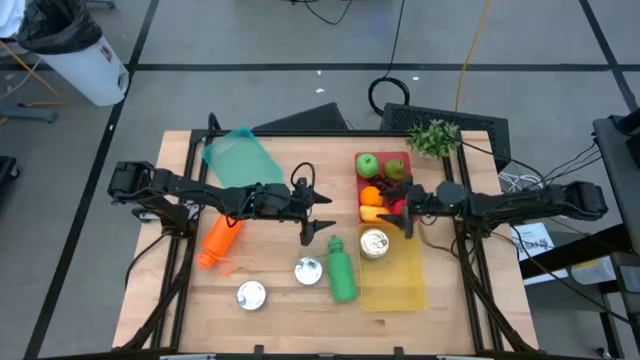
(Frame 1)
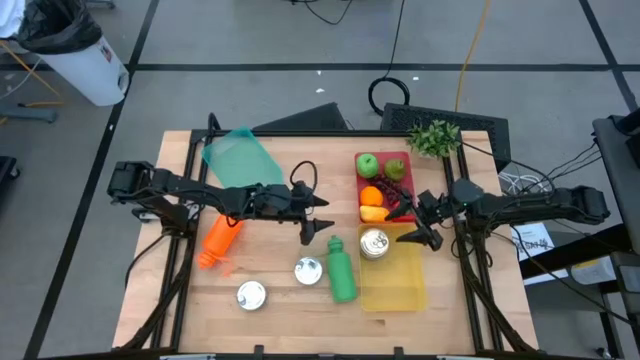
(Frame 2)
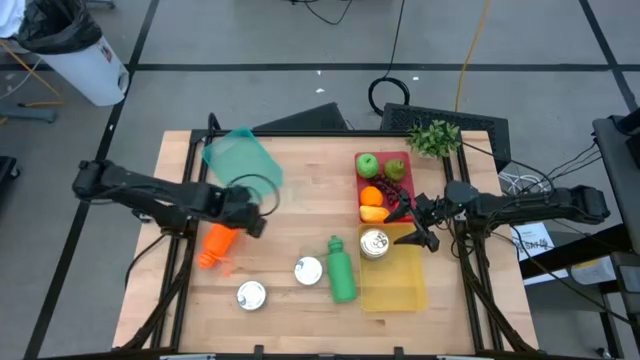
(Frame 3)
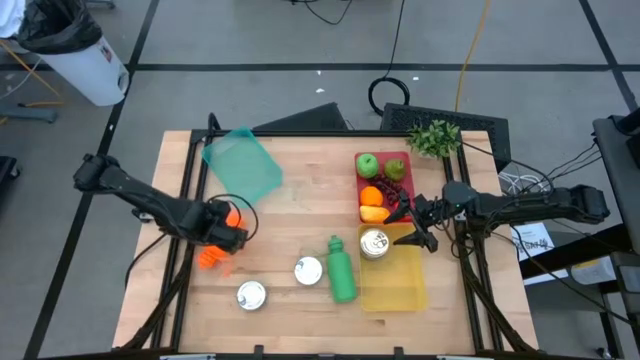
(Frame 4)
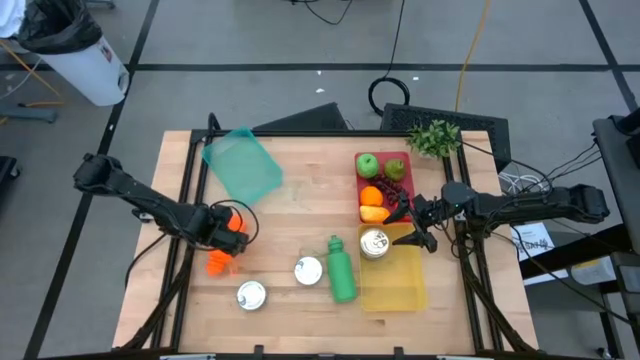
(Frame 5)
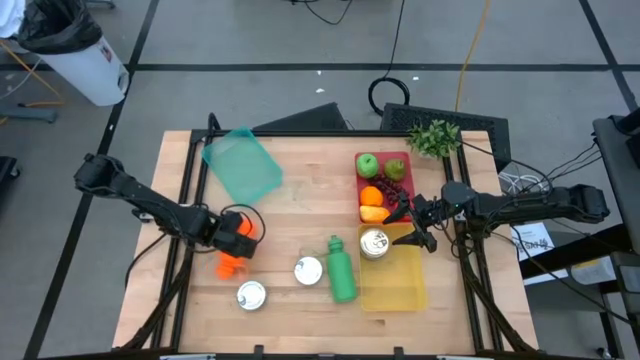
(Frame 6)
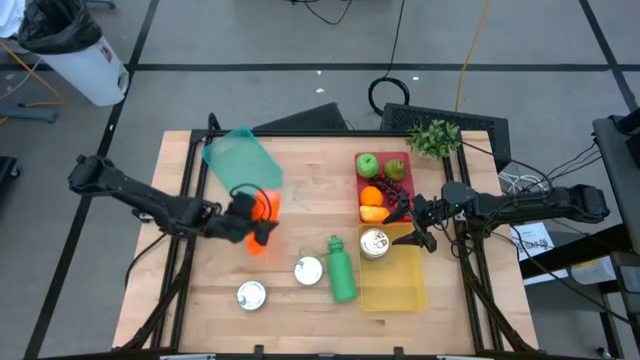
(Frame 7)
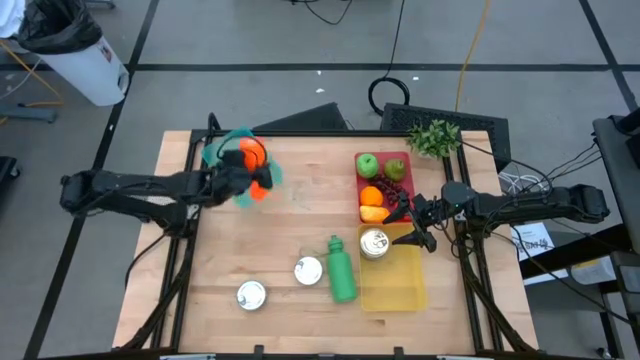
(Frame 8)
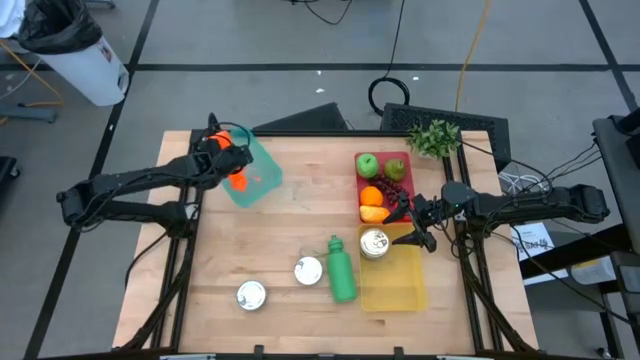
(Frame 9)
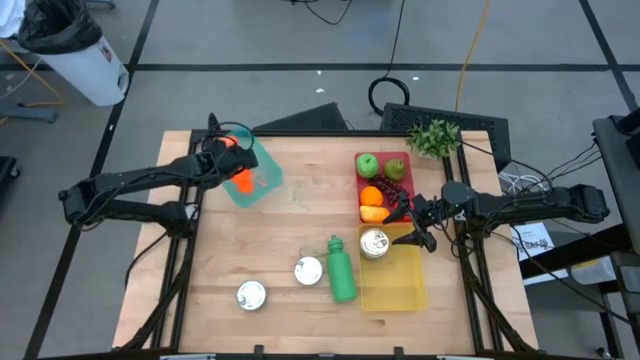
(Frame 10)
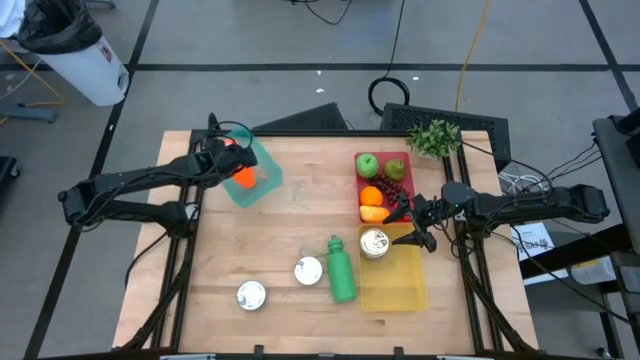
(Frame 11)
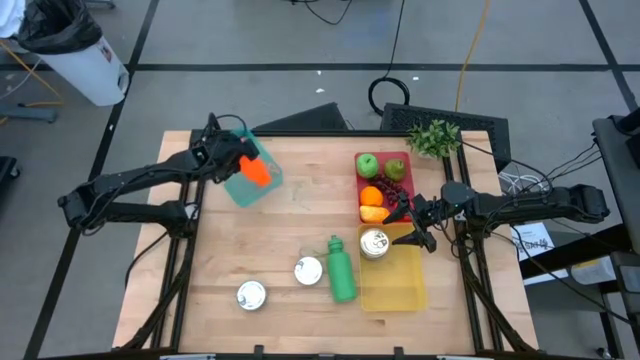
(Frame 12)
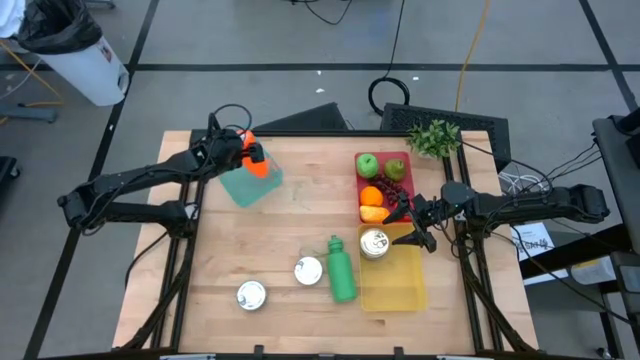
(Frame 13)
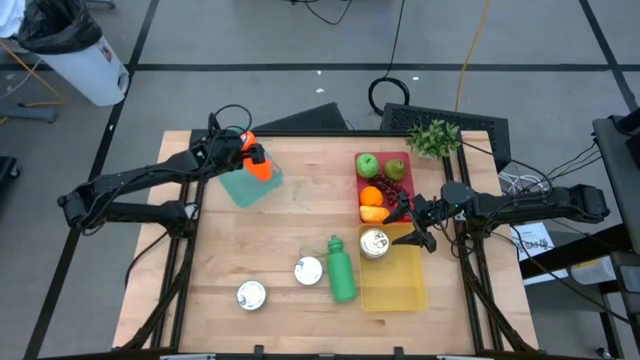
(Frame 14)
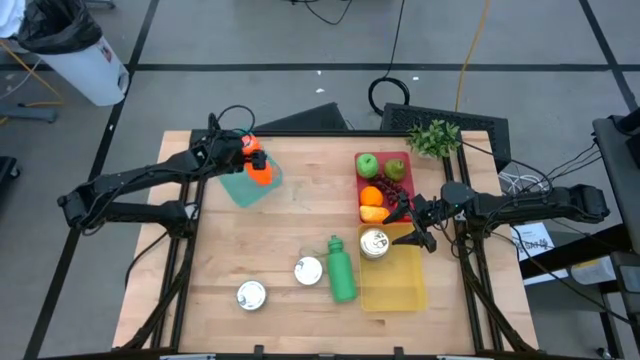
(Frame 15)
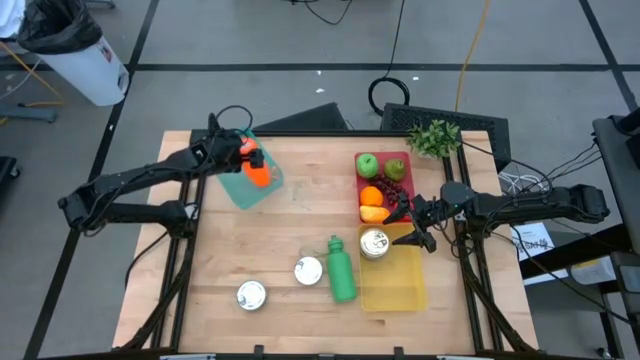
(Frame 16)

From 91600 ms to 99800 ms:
Task: Pick & Place Food Item
Put the orange tumbler into the blue bin

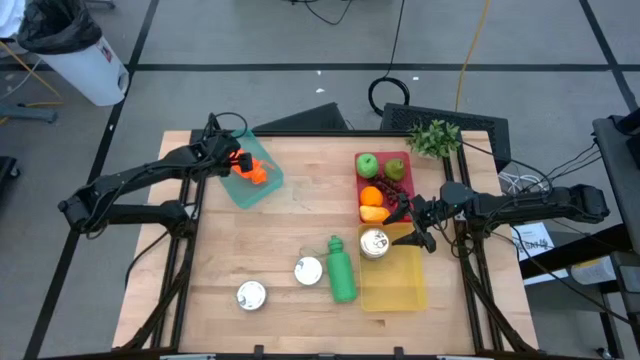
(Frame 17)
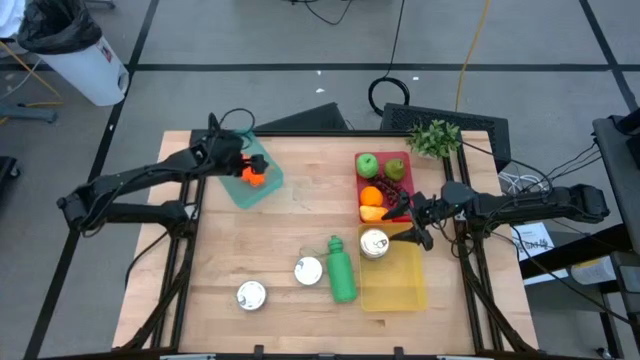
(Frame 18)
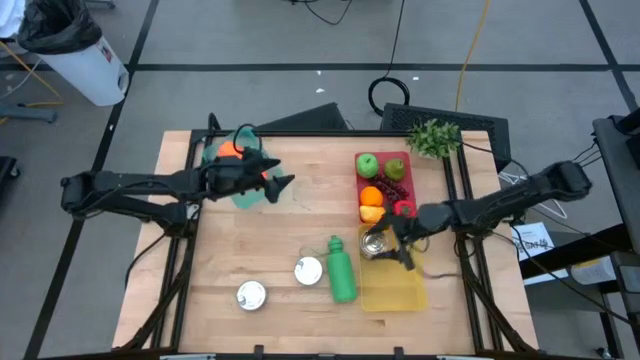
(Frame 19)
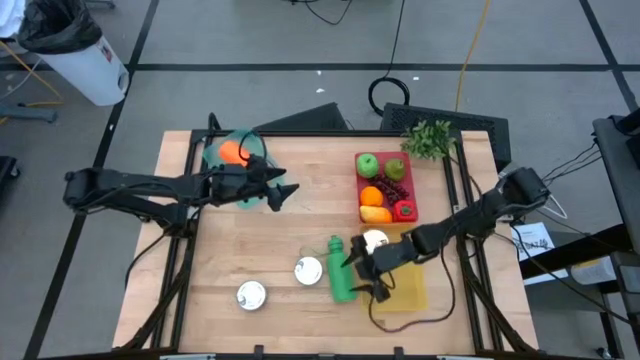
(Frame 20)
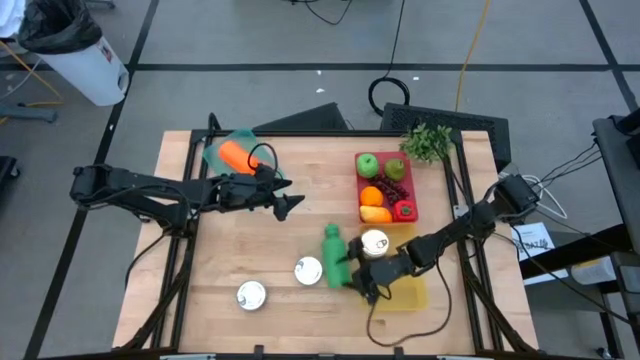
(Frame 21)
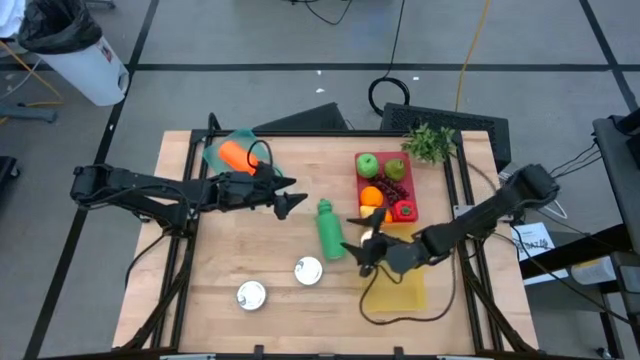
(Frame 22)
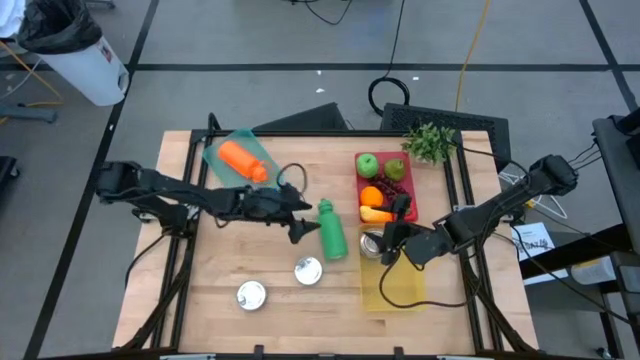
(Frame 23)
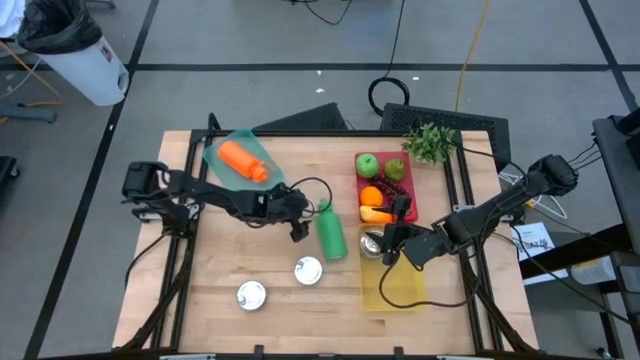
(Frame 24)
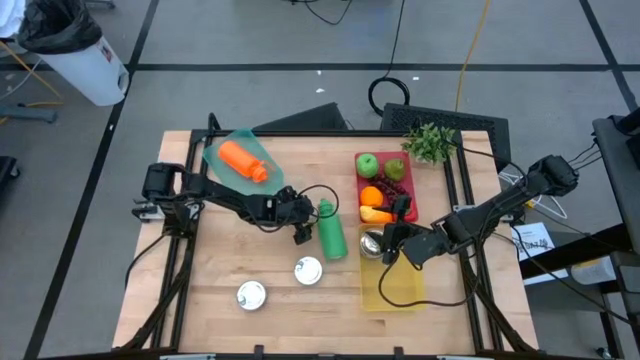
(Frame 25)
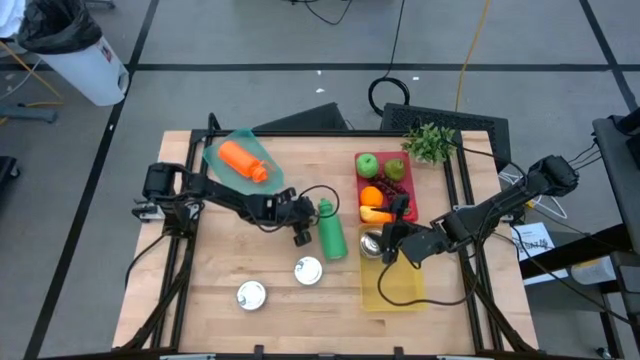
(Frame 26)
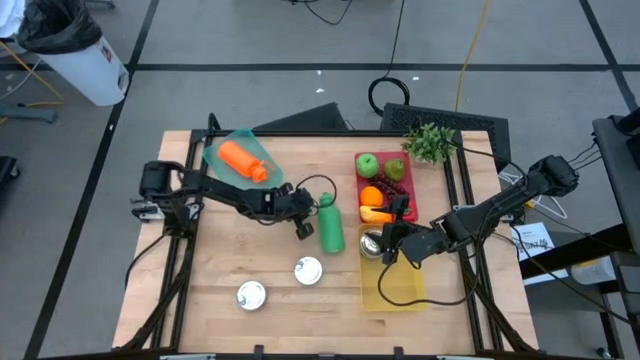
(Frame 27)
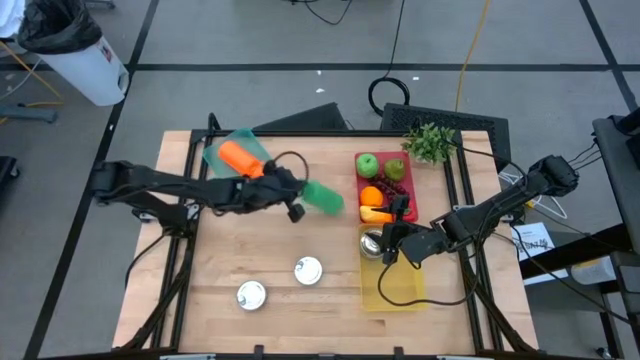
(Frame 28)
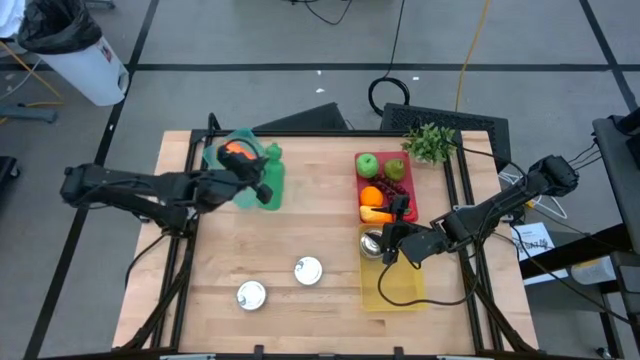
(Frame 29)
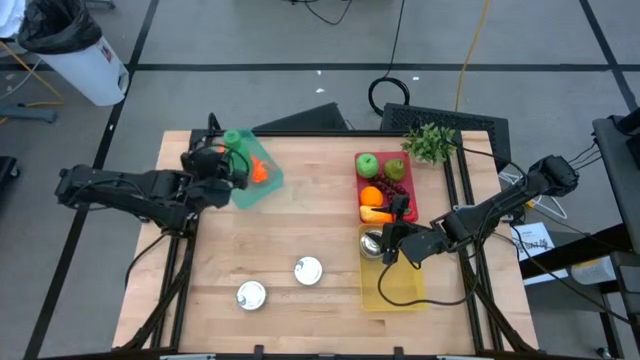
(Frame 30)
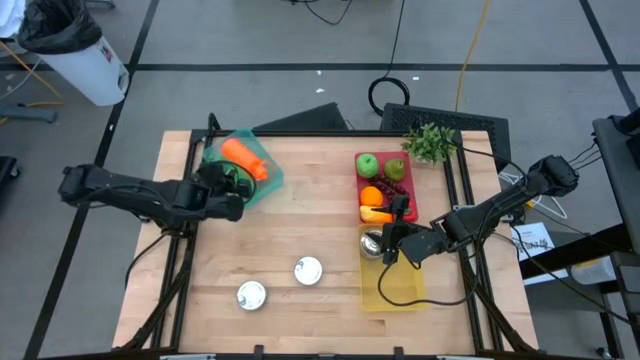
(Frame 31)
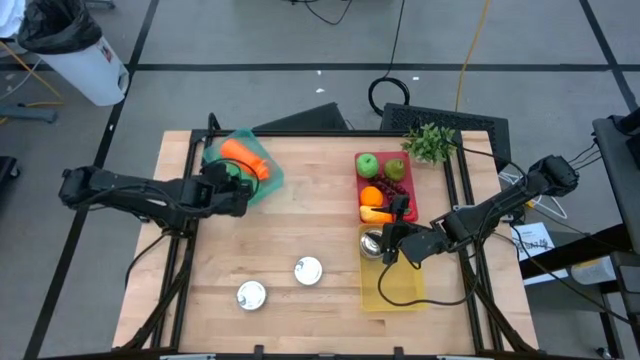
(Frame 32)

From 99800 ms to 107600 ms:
Put the green tumbler into the blue bin

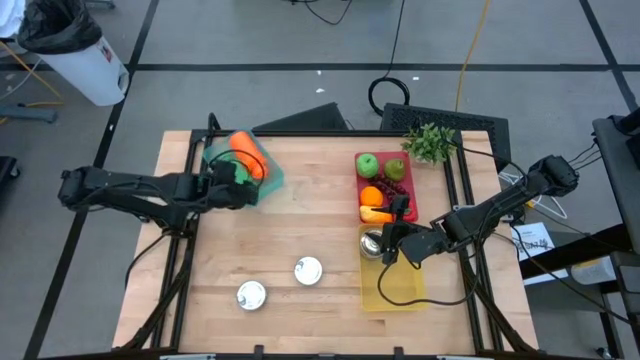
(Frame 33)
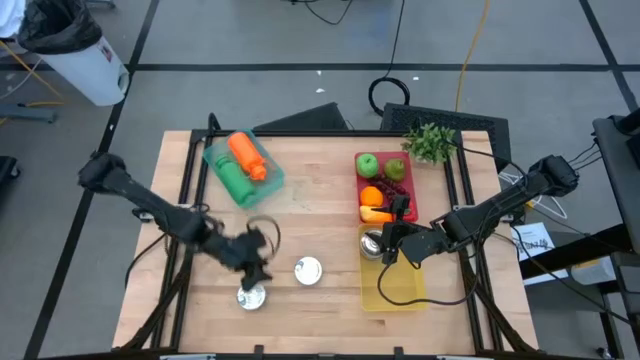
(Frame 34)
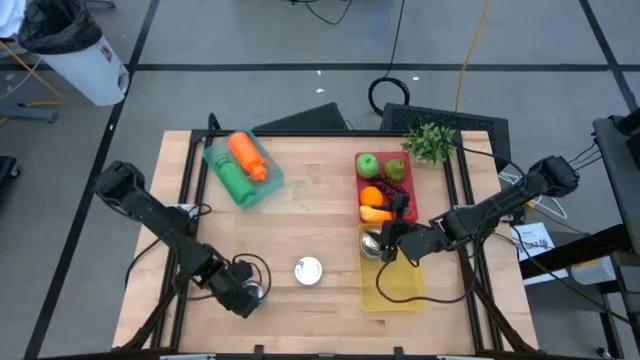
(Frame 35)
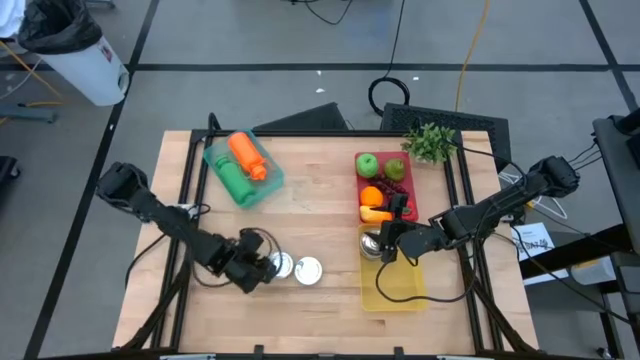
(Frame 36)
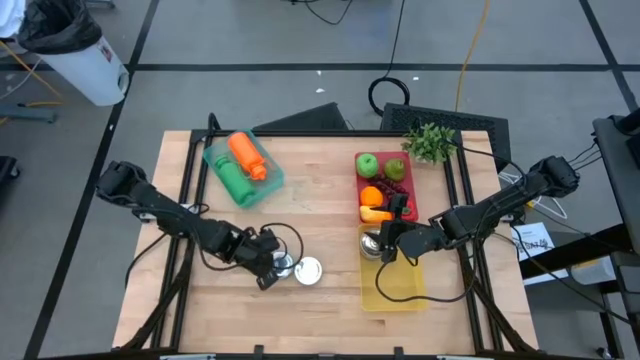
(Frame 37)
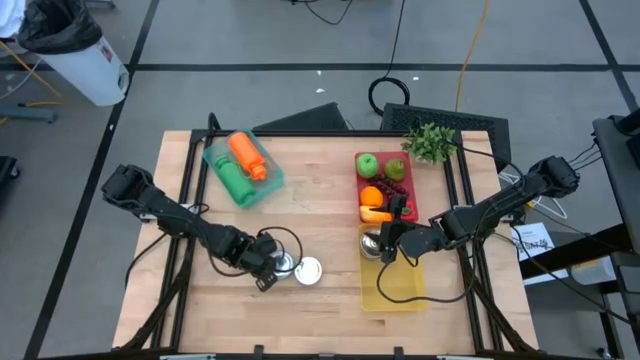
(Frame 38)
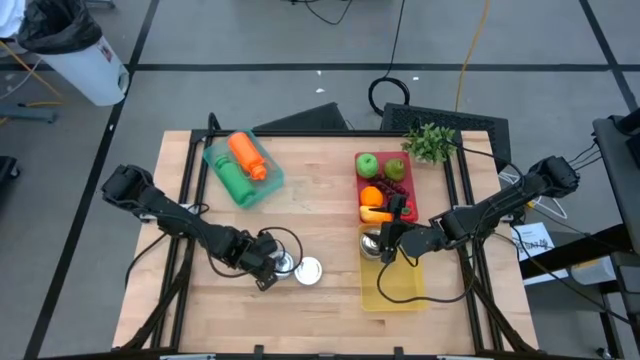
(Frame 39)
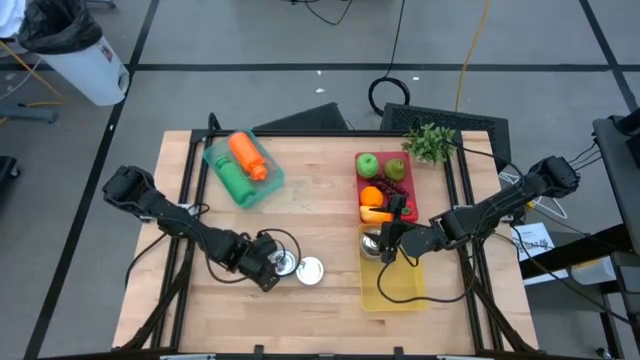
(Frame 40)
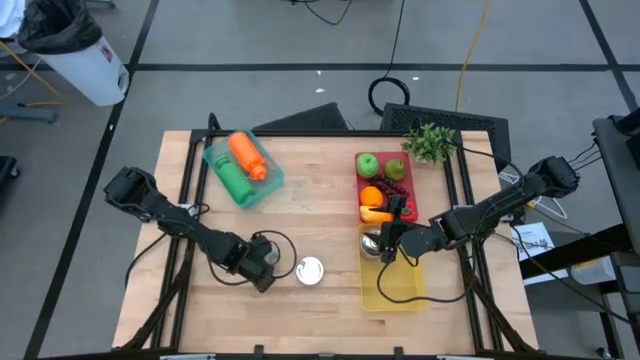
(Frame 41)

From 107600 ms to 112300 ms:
Put the green tuna can into the yellow bin
